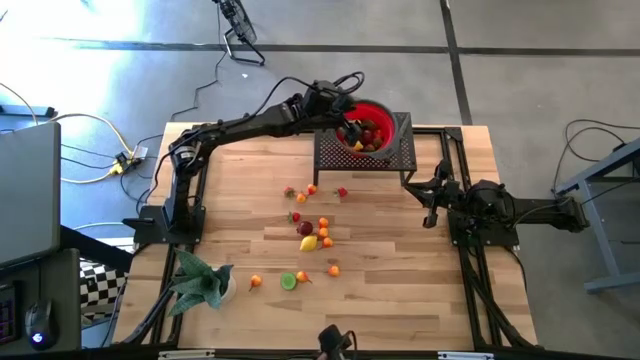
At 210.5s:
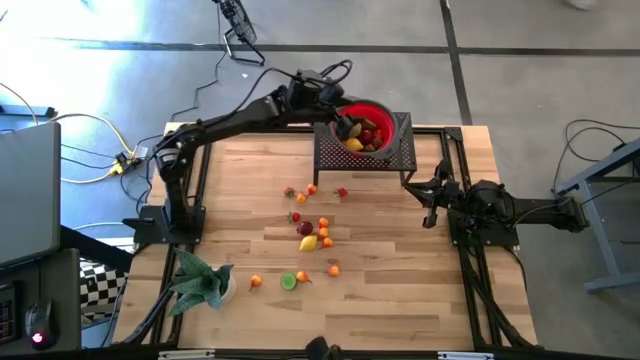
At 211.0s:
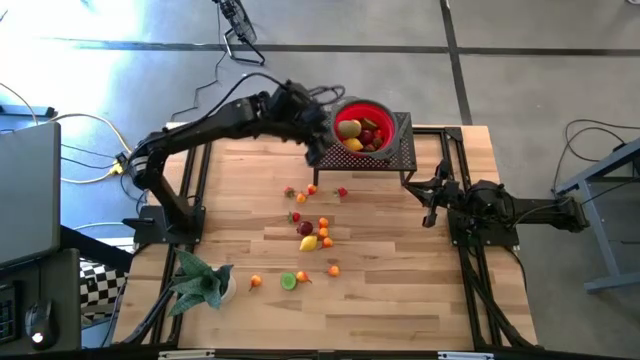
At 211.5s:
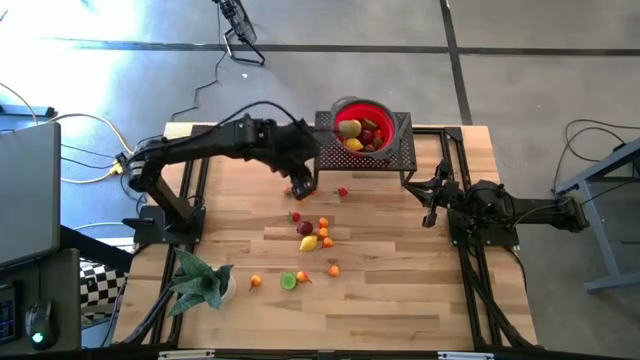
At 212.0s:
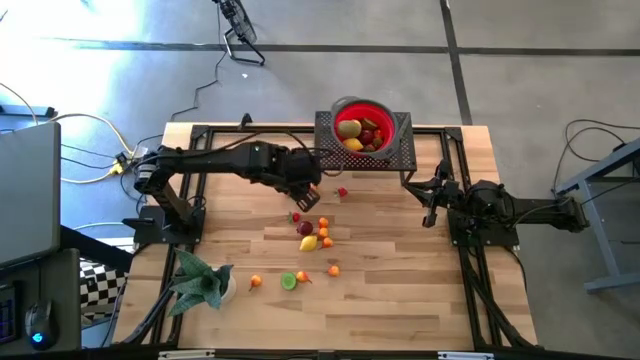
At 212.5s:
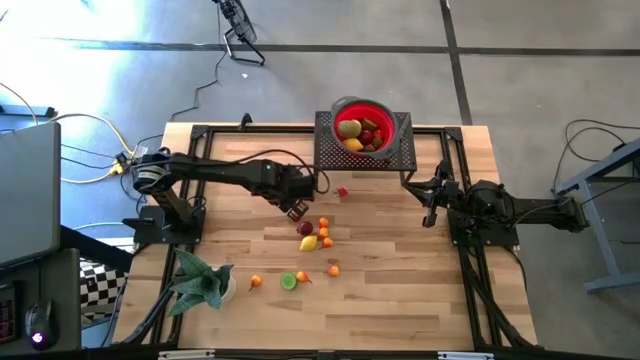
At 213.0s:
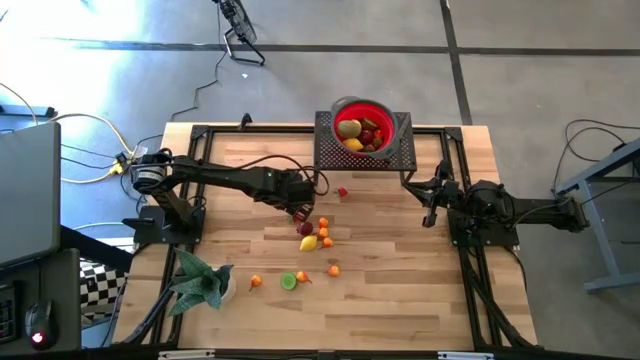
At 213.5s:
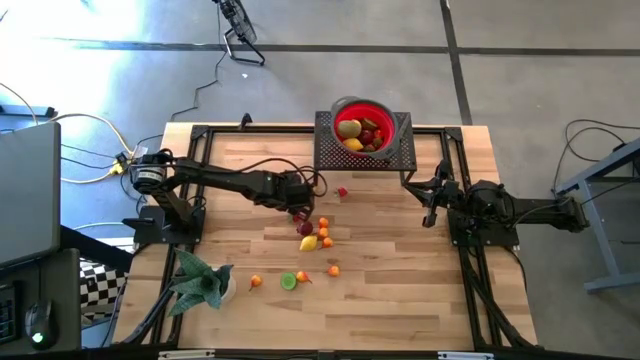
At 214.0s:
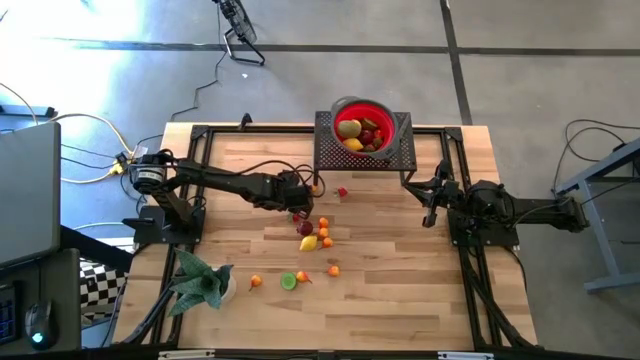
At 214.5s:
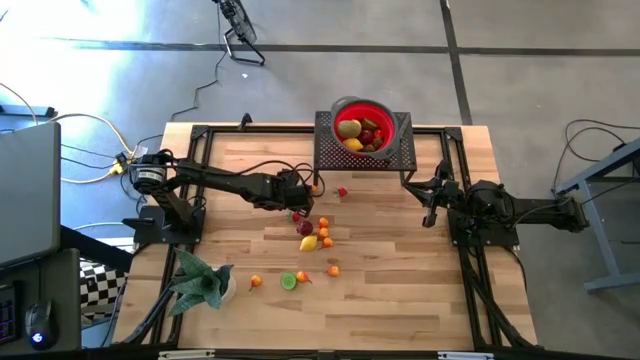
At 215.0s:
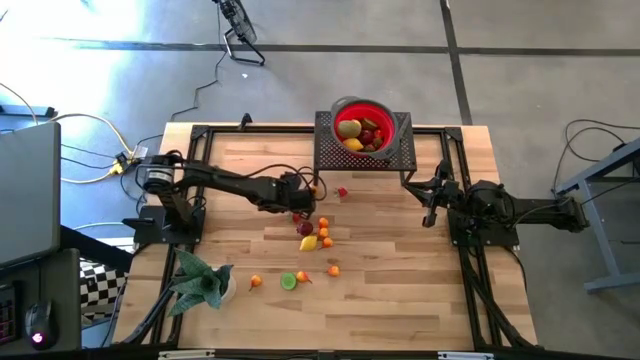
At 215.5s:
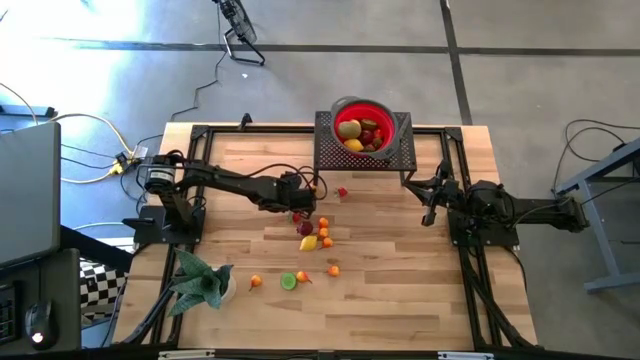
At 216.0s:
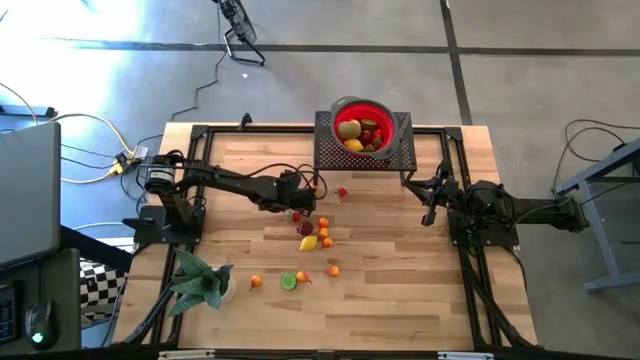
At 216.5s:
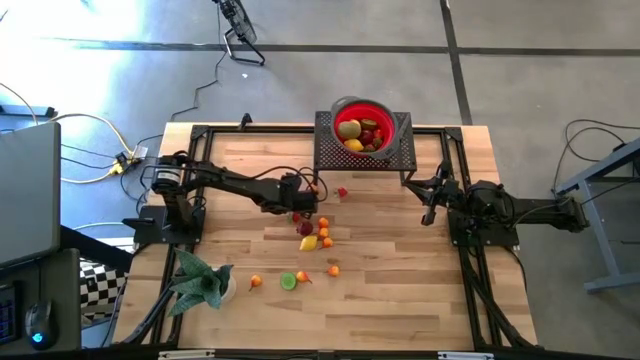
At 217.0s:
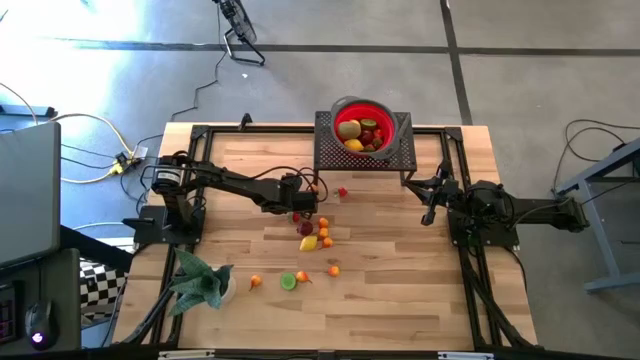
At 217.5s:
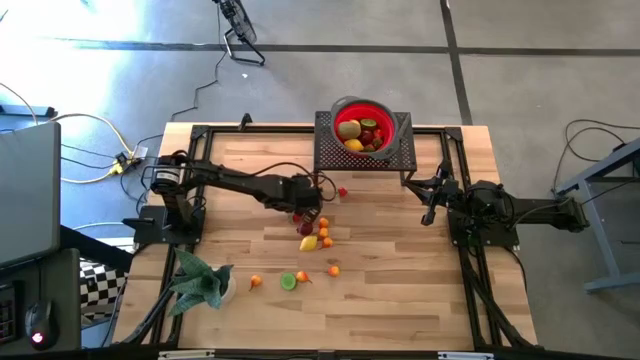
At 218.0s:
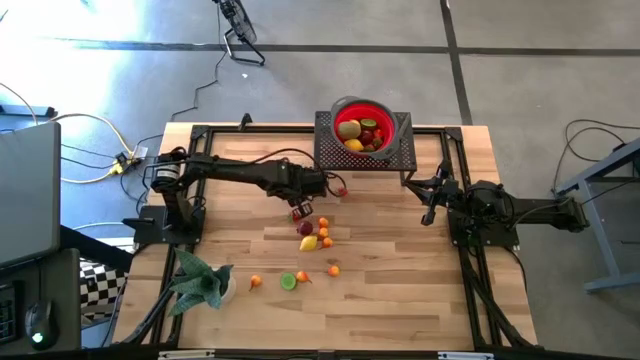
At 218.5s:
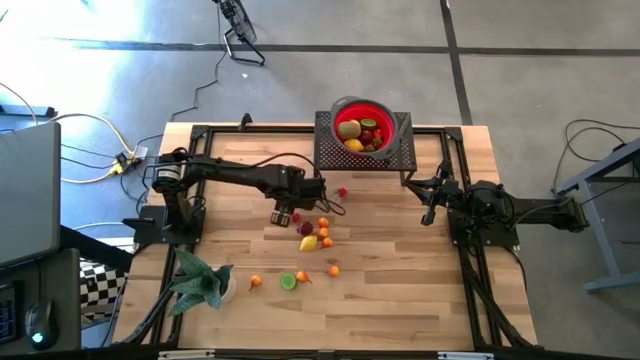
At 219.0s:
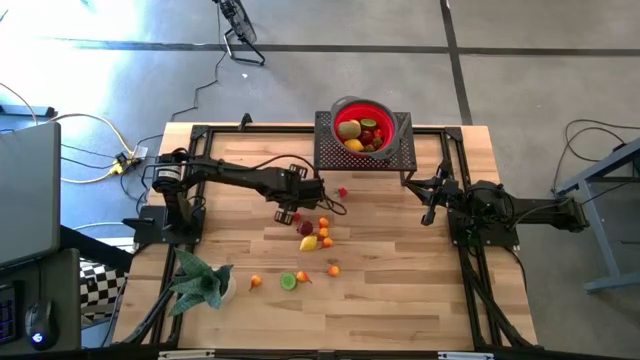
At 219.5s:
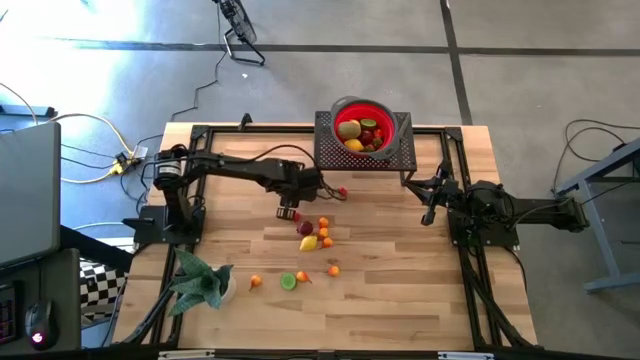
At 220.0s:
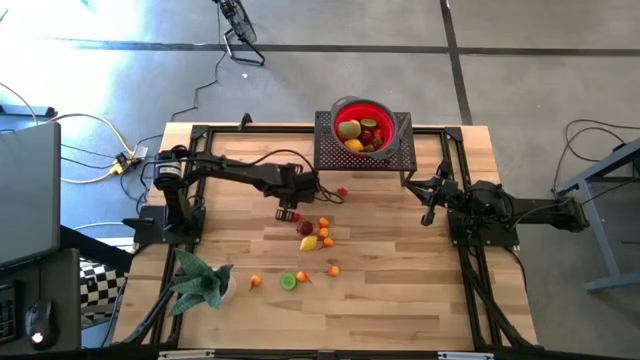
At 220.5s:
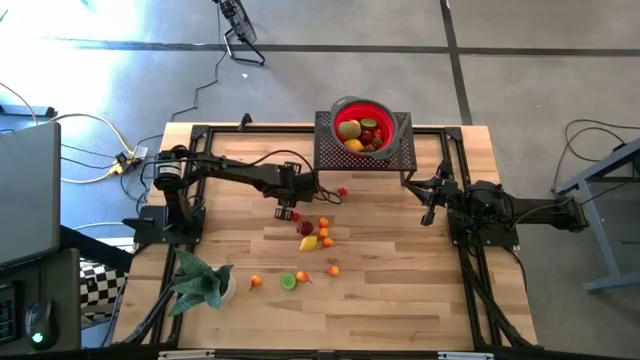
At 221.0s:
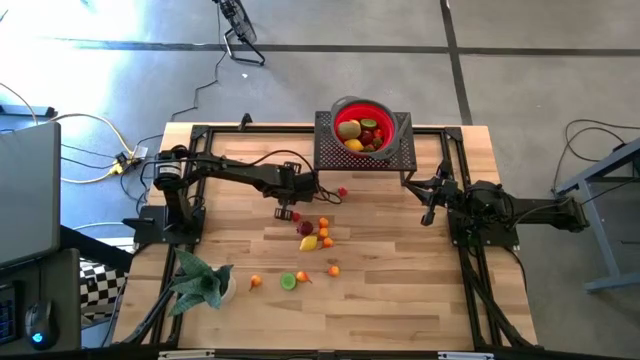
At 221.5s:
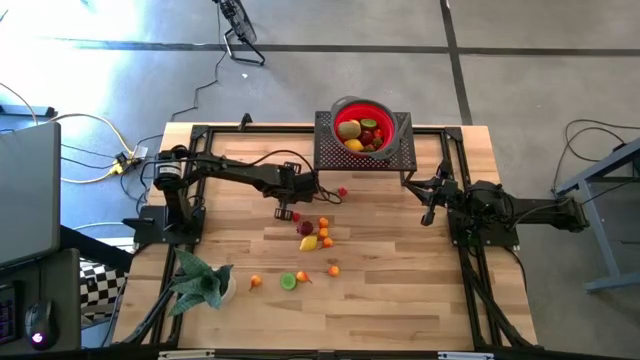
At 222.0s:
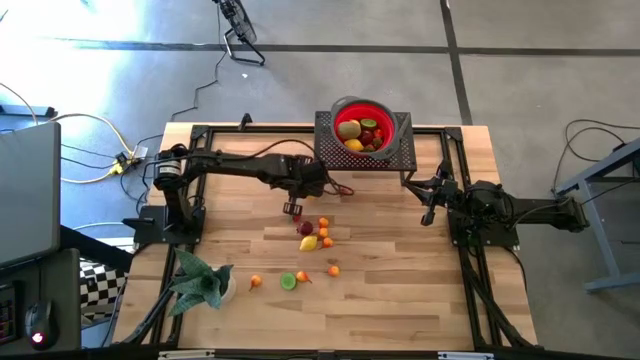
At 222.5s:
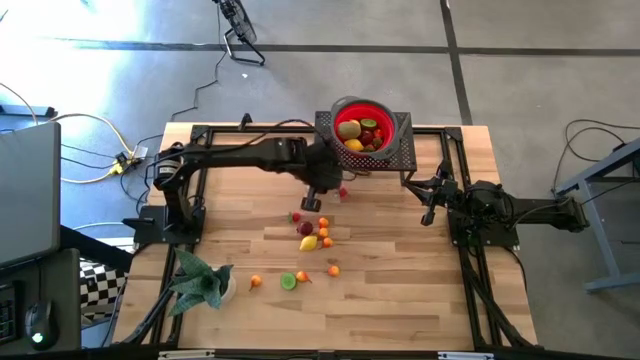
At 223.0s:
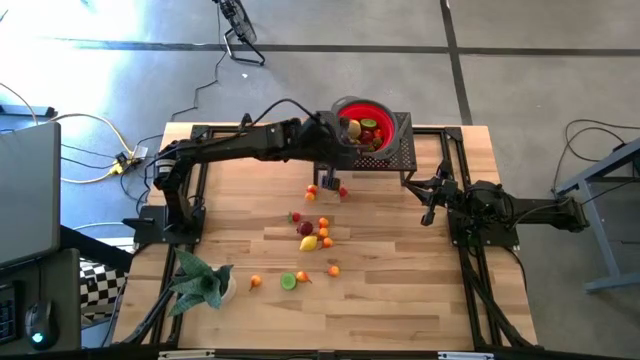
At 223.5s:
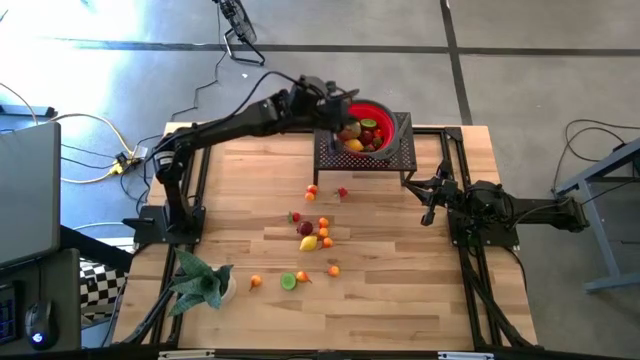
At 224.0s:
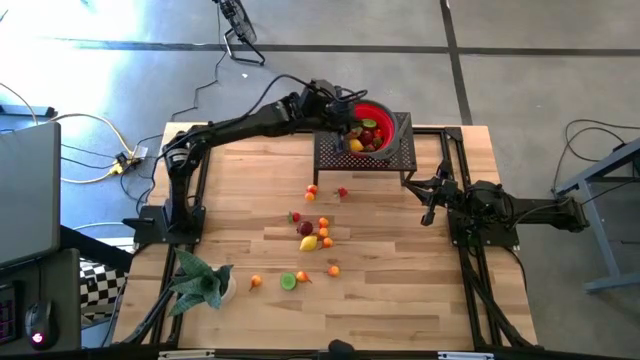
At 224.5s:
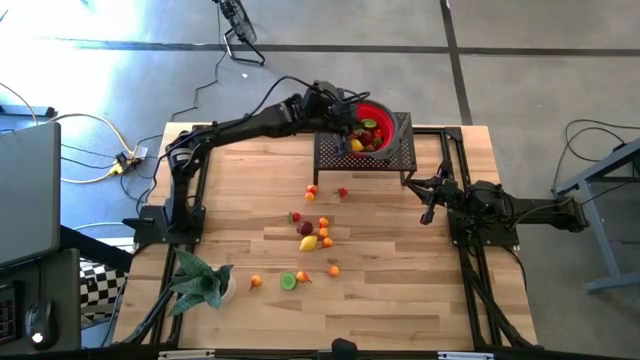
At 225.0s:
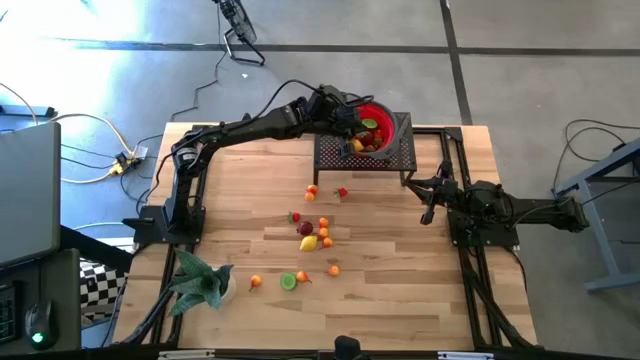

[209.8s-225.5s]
Task: Pick & Place Fruit
Put the strawberry into the strainer on the shelf

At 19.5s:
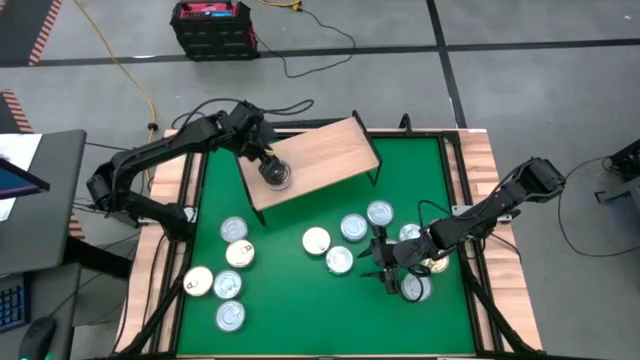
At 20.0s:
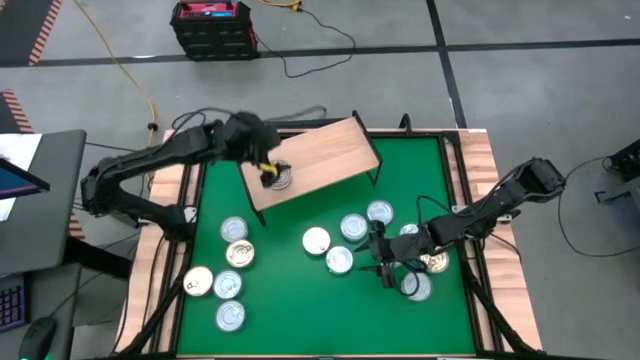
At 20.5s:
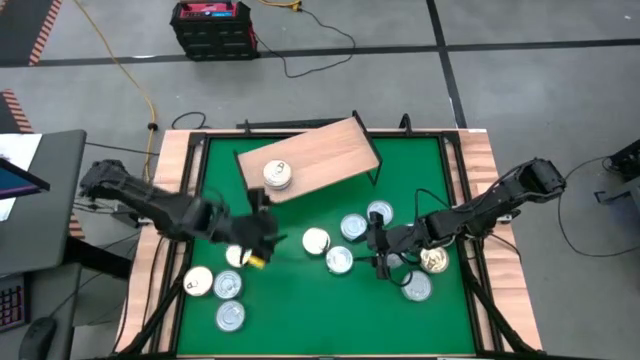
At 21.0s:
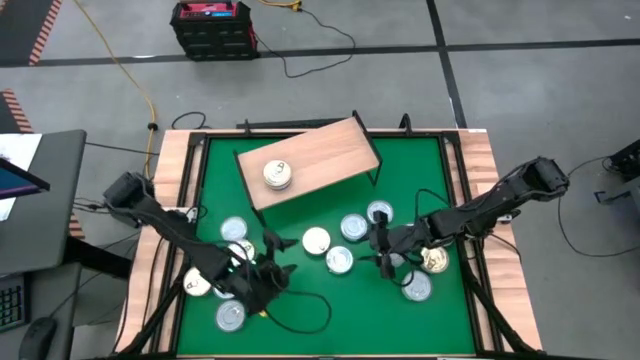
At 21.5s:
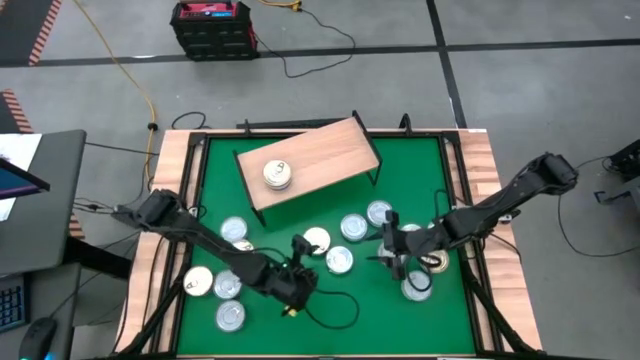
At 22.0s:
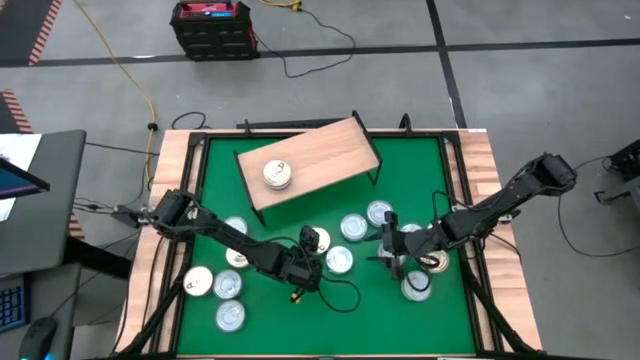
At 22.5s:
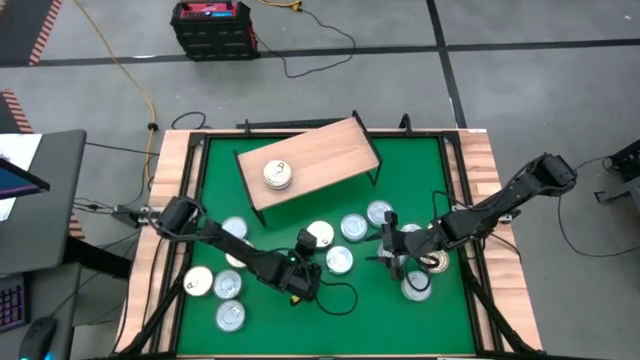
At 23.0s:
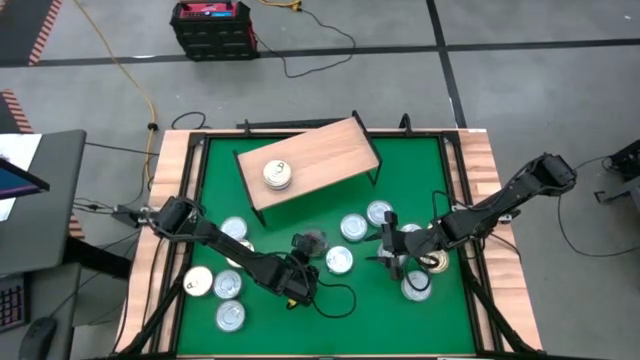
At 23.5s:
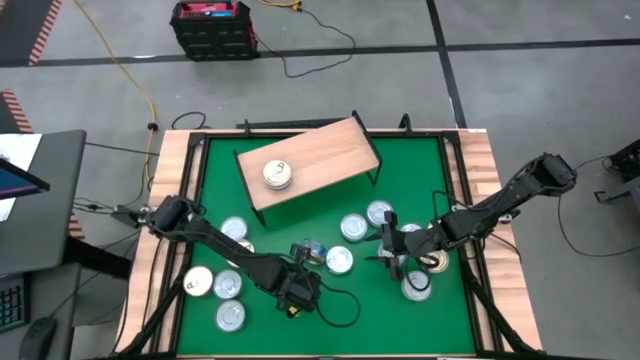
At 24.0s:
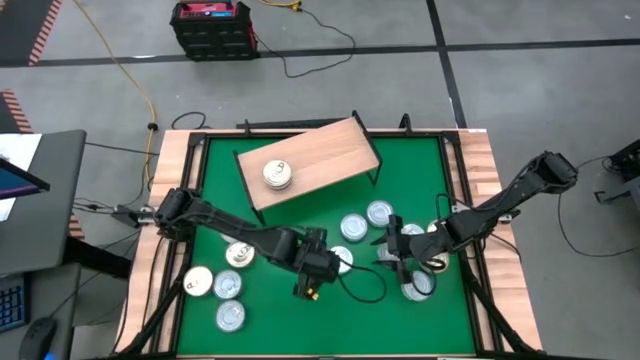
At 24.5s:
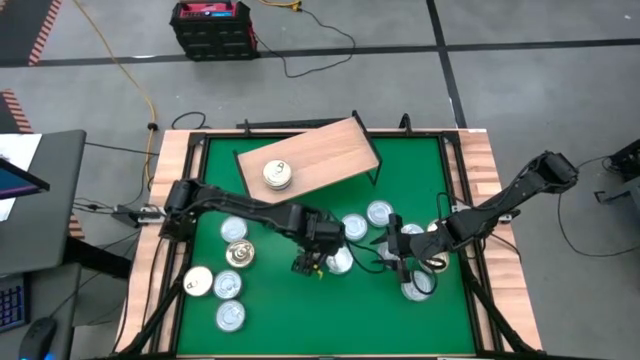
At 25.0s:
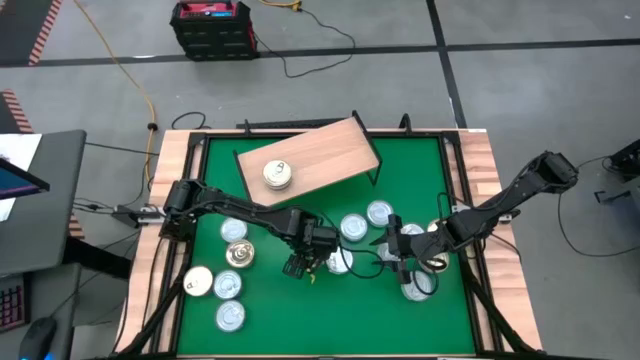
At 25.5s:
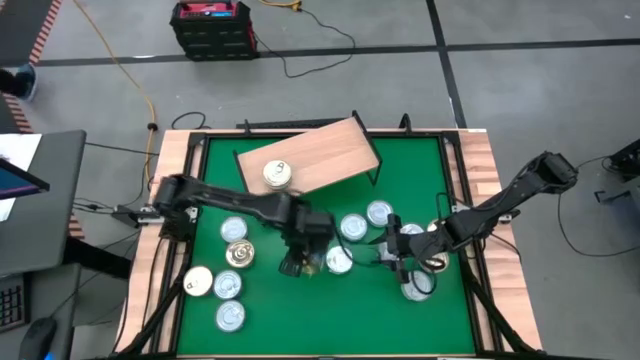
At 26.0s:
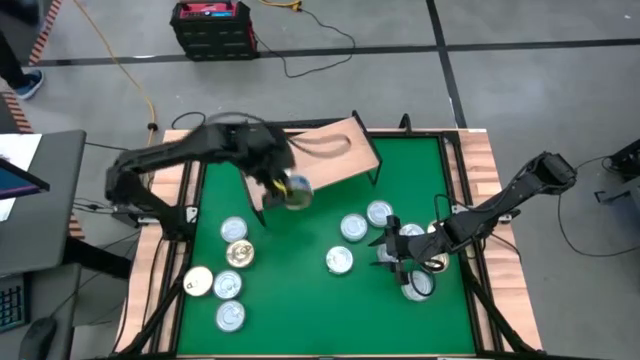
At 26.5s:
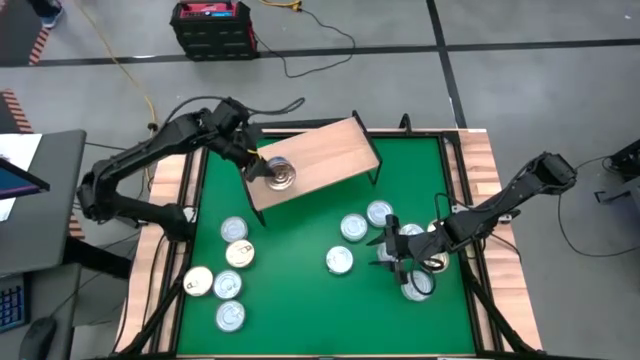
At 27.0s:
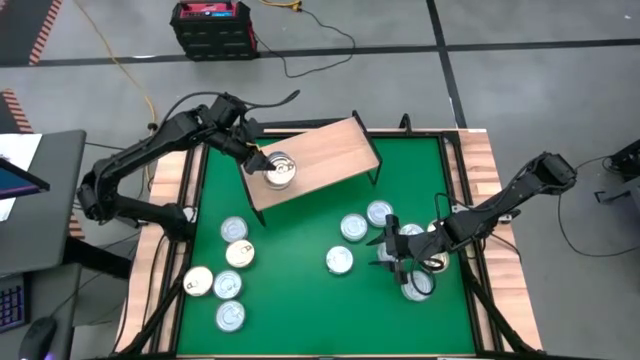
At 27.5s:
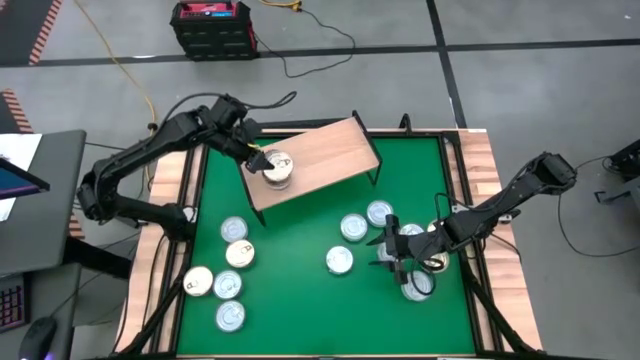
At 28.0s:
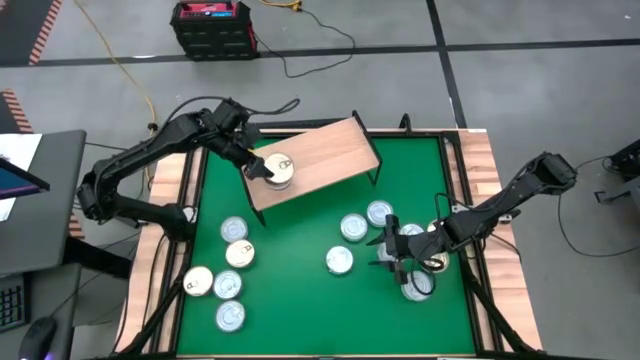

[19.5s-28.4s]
Task: Stack canned seafood by type on shelf
Stack the blue pink tuna can on top of the blue pink tuna can on the shelf
